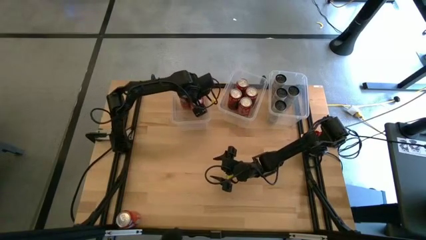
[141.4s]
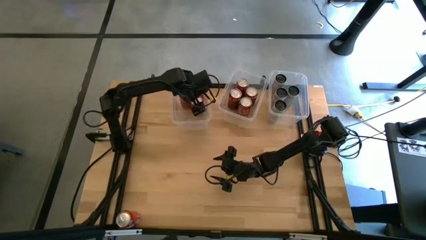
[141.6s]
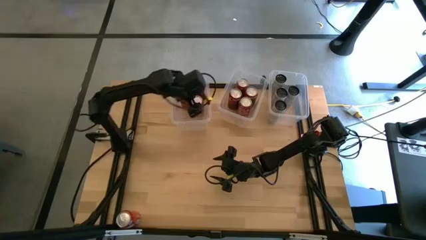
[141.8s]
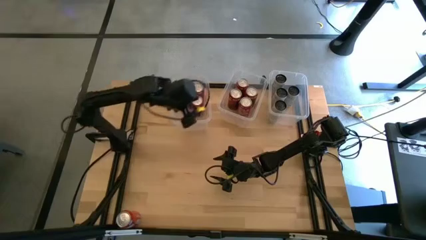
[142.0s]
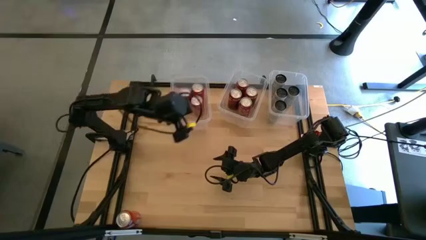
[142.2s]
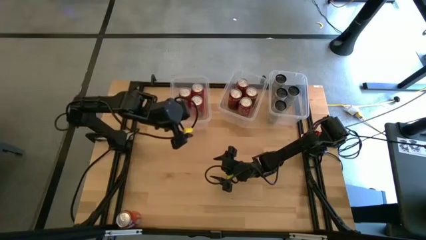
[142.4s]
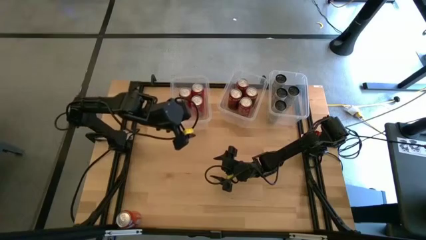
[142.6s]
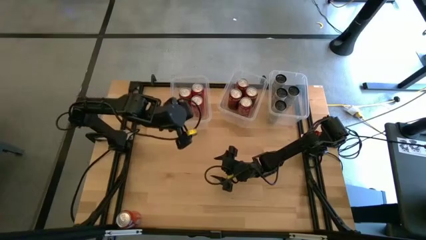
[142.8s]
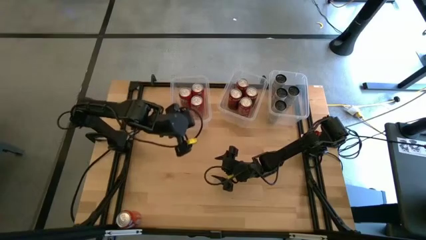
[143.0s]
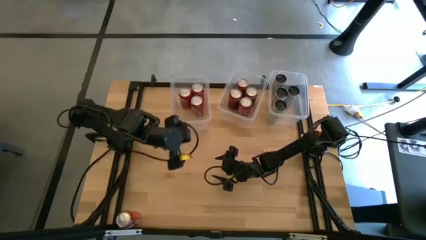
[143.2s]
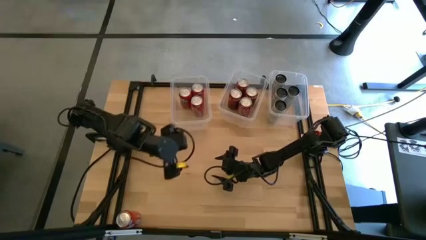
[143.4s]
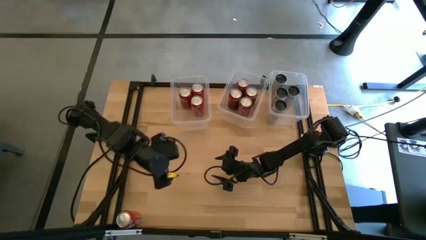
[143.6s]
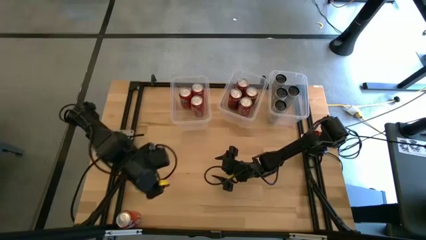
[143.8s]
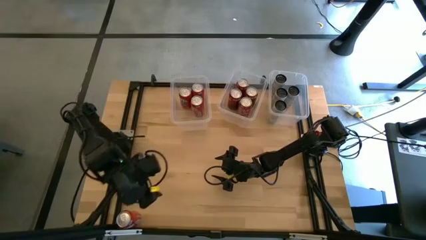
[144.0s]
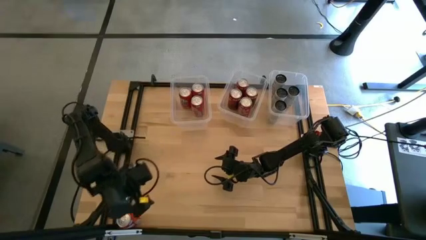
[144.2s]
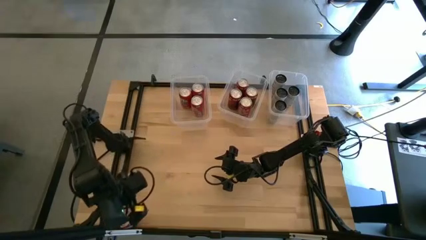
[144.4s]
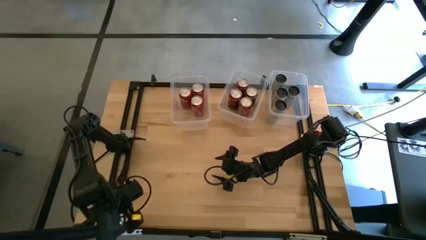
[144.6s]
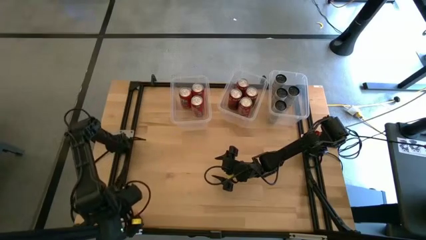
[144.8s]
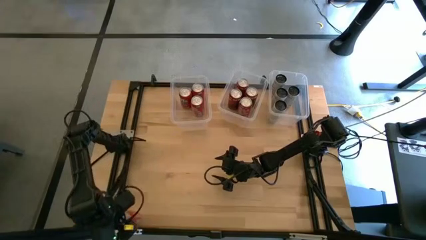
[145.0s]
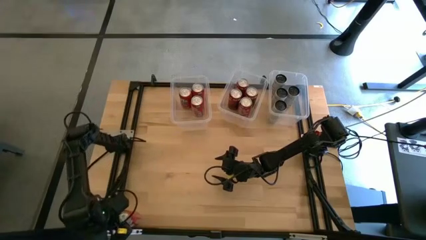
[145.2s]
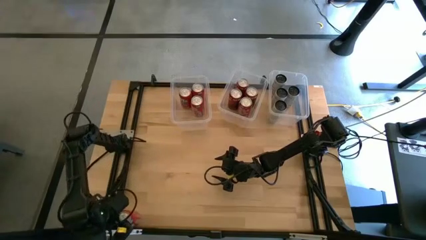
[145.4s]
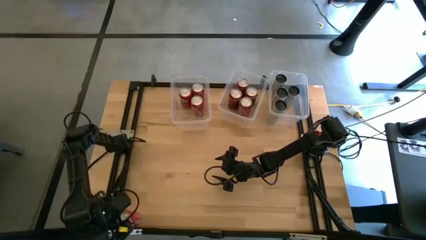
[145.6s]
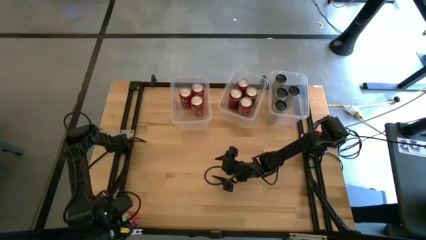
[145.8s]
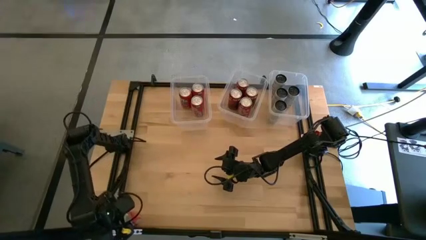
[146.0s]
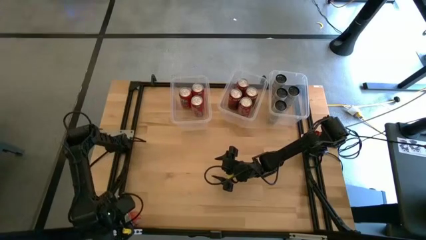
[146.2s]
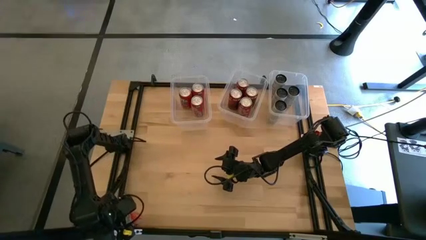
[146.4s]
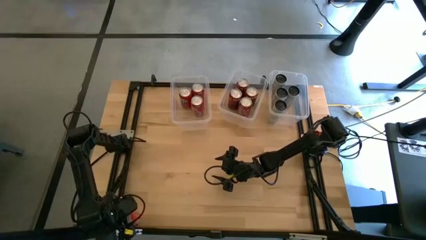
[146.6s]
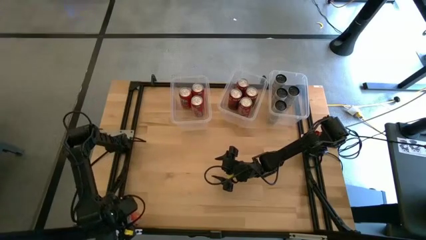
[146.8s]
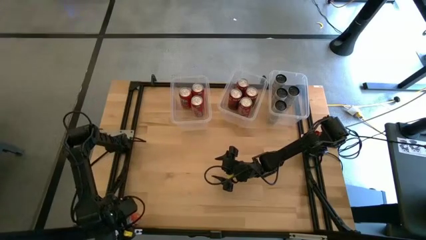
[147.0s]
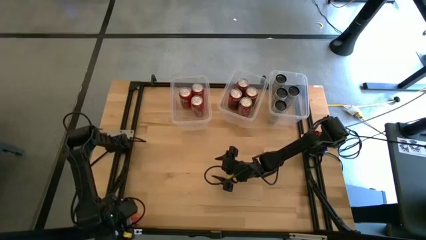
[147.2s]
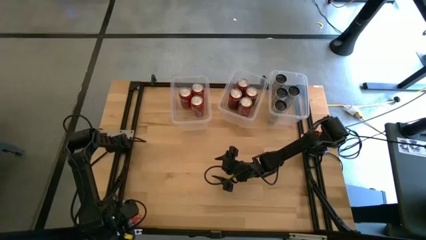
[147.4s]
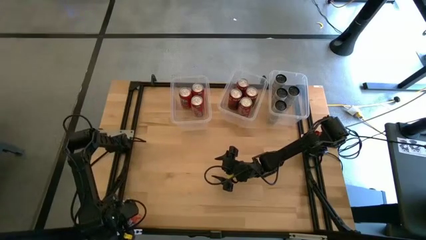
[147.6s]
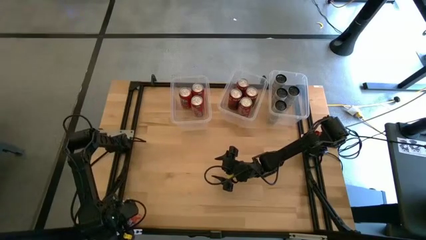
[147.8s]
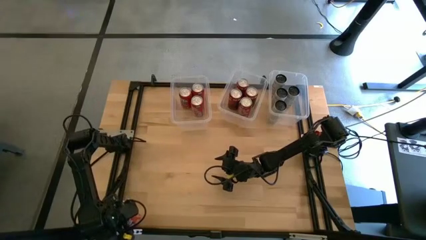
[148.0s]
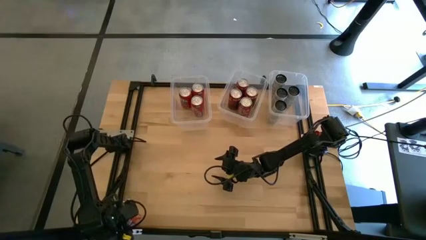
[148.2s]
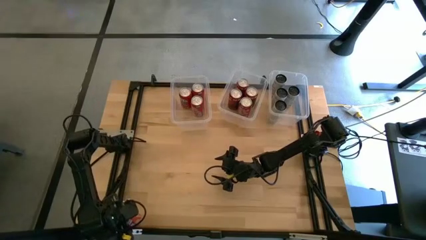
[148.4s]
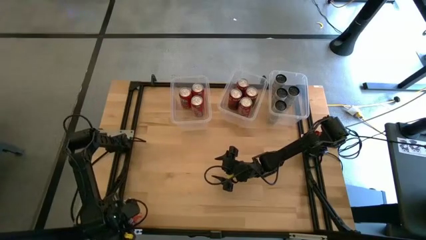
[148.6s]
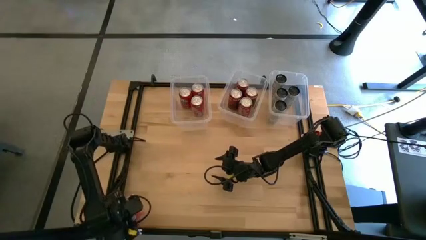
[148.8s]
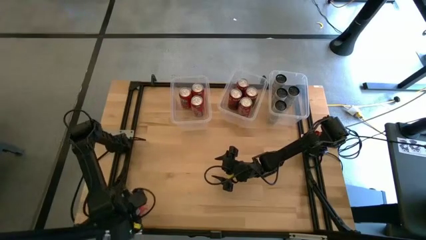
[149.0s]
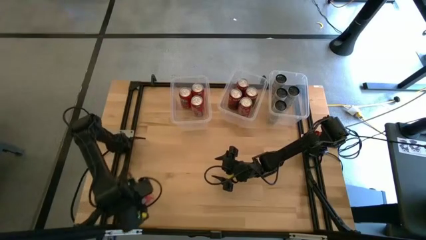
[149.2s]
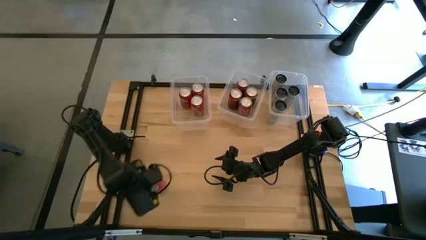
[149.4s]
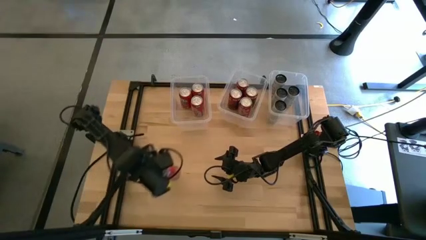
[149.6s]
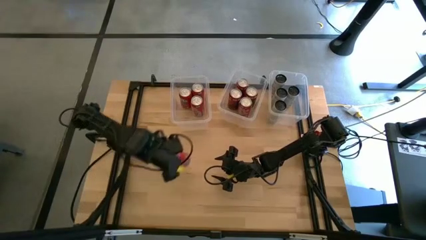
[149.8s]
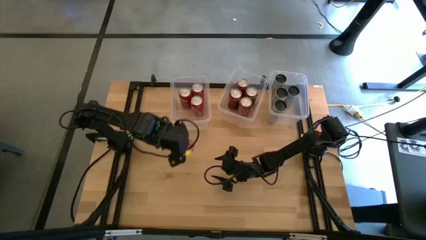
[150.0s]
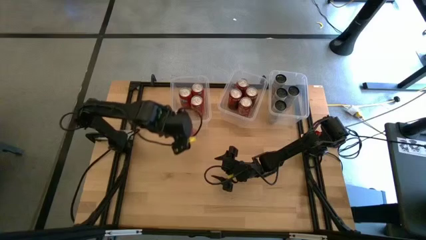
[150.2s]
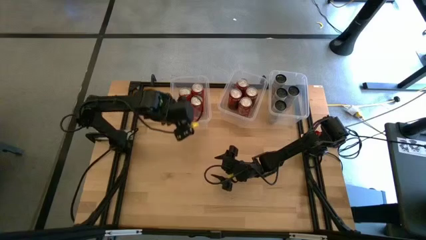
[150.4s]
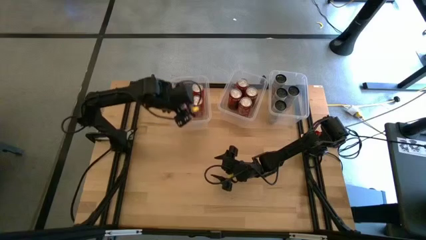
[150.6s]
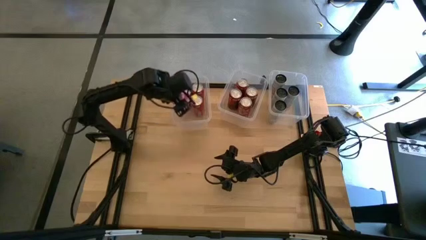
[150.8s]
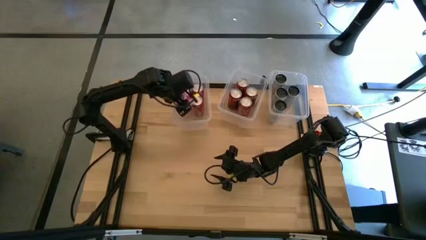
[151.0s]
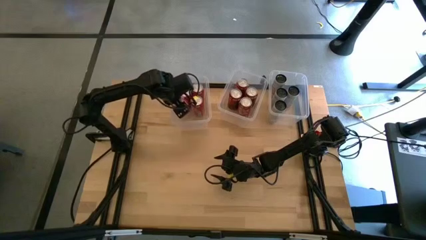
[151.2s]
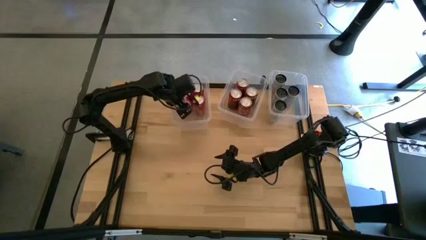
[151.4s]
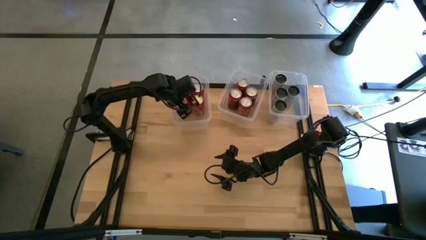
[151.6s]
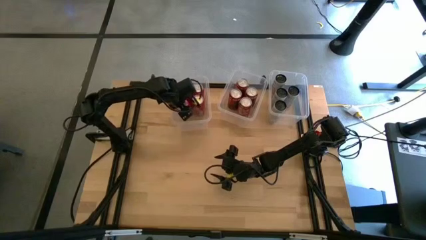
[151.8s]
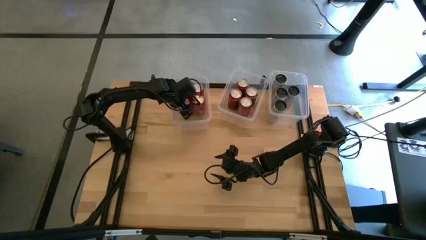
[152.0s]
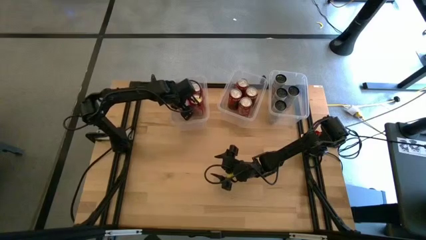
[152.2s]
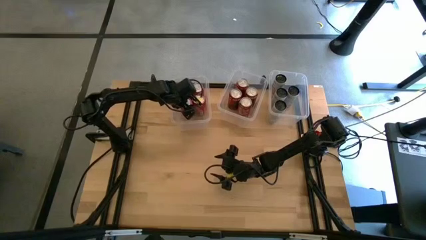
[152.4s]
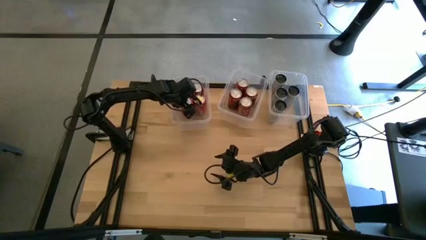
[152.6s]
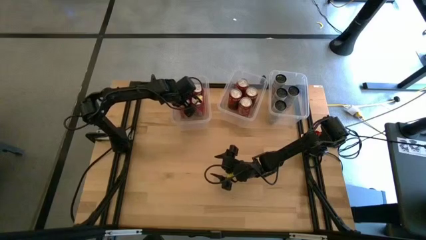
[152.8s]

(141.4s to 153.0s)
Task: Sort soda cans
Put the orange soda can into the left transparent bin

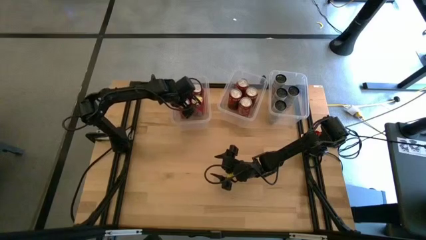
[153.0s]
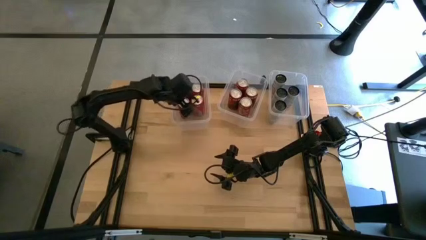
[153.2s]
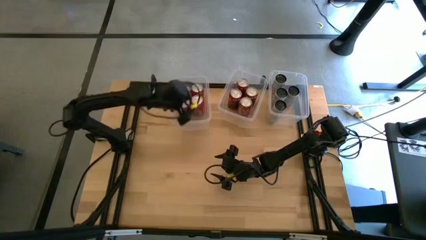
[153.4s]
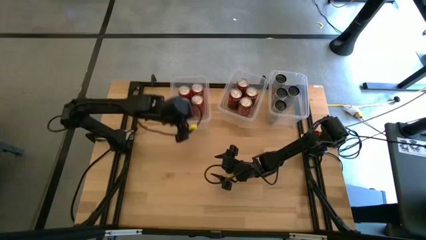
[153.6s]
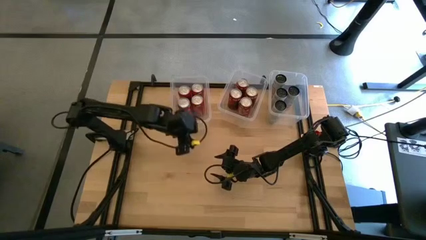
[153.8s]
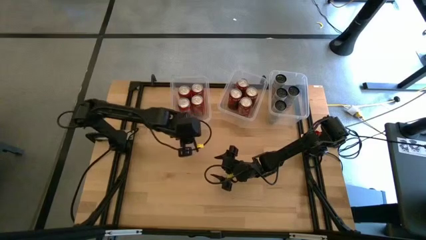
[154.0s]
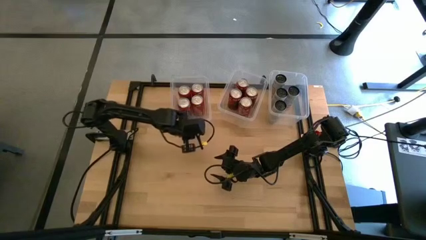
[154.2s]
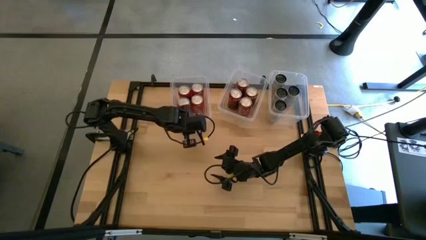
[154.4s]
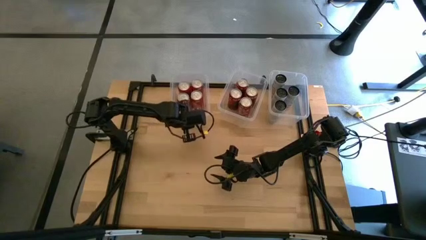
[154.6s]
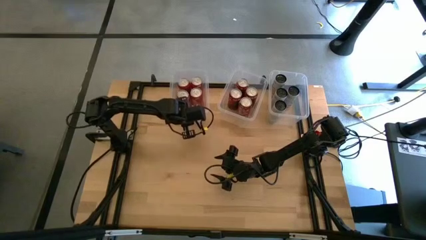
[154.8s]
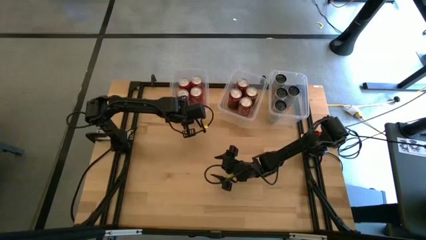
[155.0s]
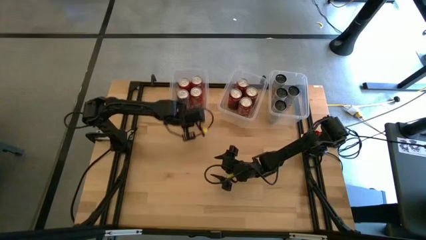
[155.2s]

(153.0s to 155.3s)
Adjust the left transparent bin

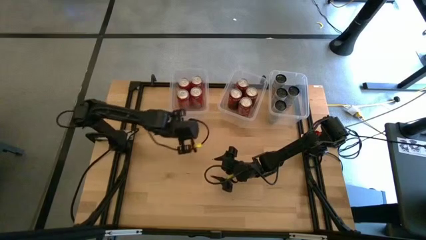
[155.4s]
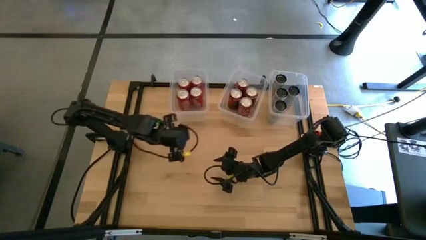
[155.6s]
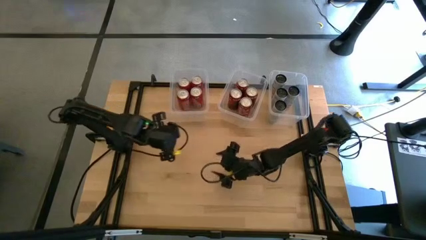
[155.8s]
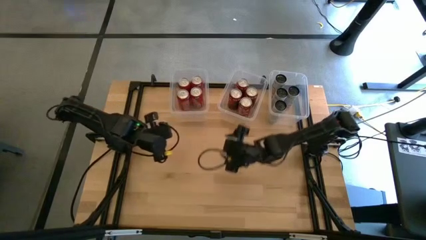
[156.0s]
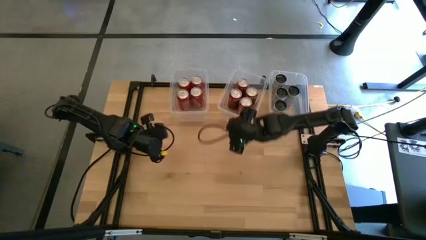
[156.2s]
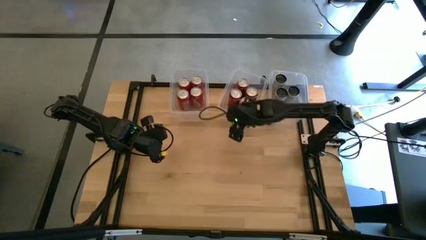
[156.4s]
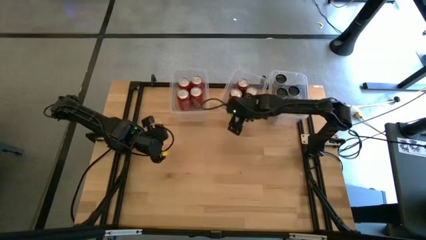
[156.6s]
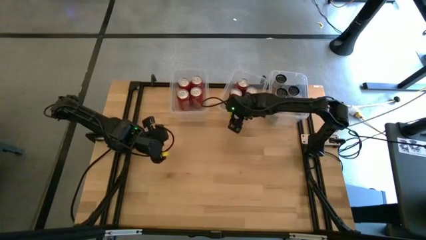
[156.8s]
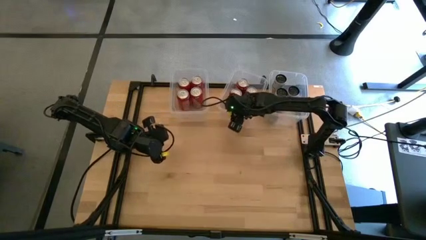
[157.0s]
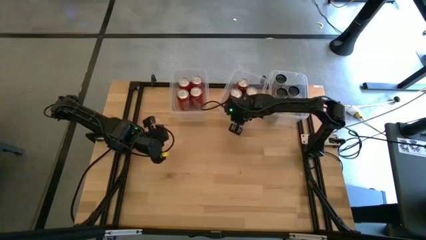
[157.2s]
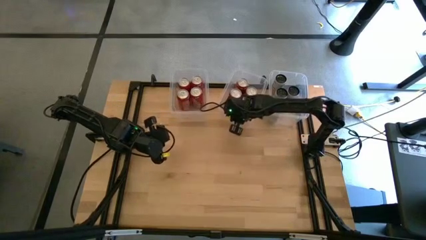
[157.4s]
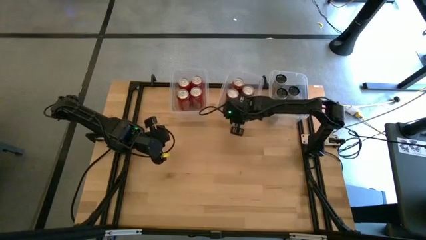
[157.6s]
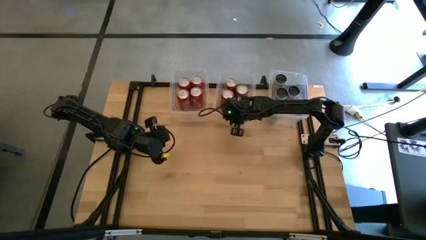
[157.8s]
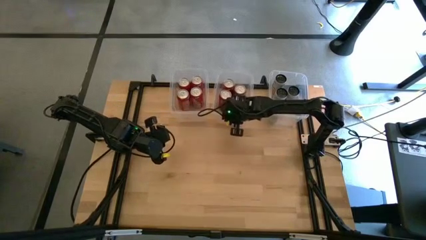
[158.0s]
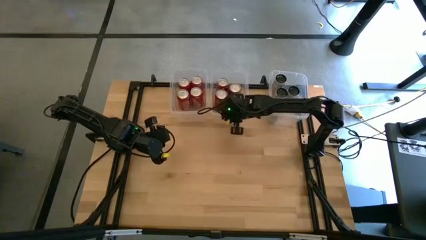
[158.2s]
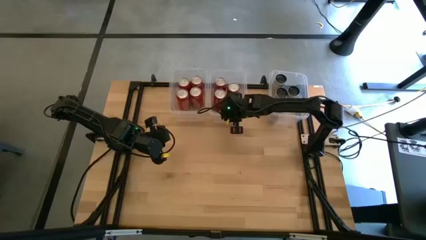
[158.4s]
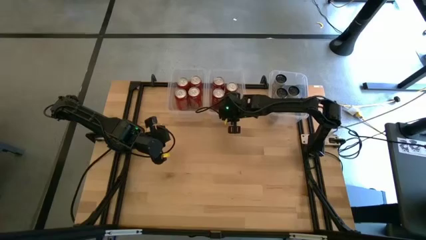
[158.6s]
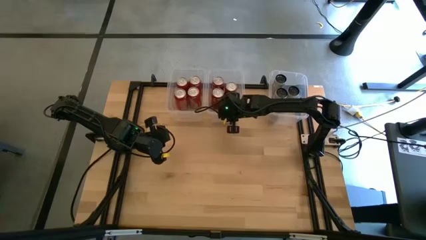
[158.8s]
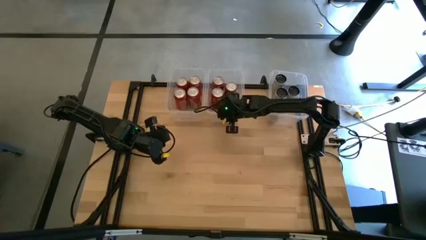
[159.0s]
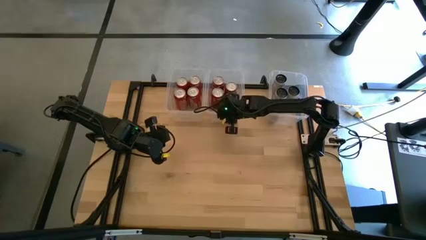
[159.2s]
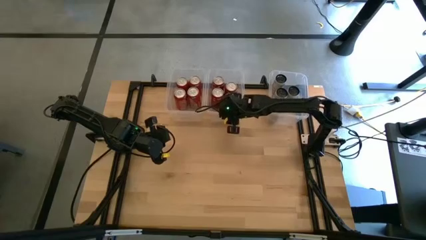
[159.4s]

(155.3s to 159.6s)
Adjust the center transparent bin
